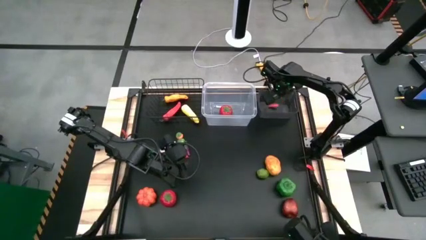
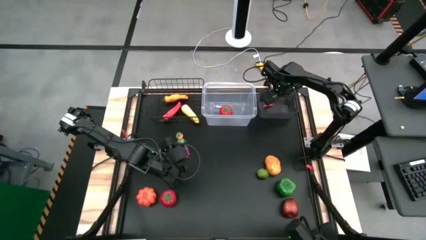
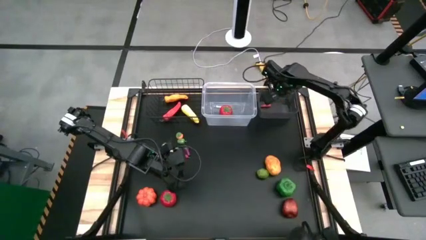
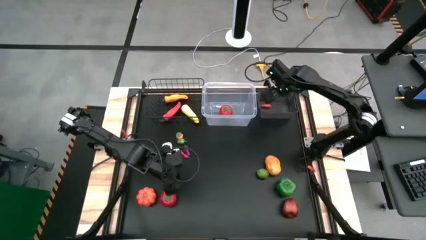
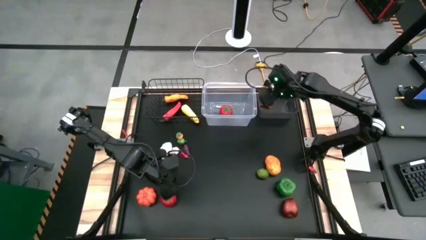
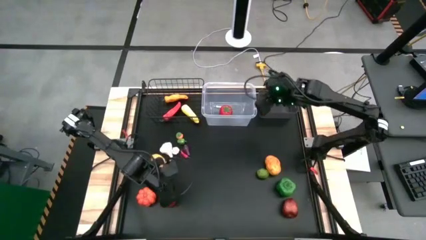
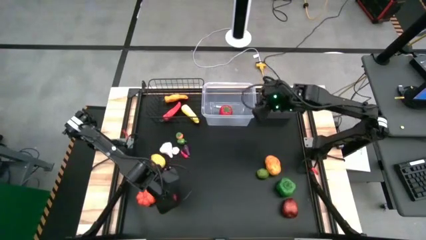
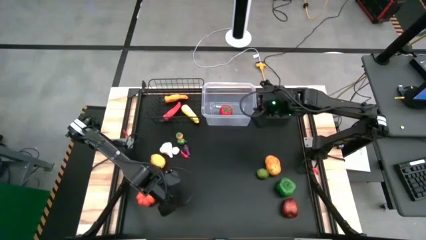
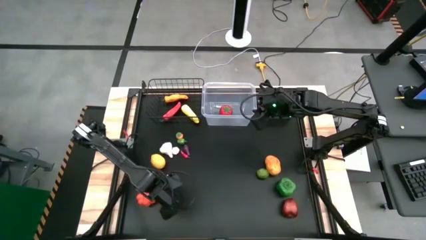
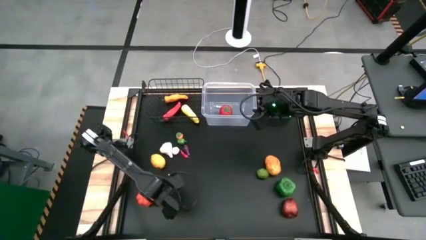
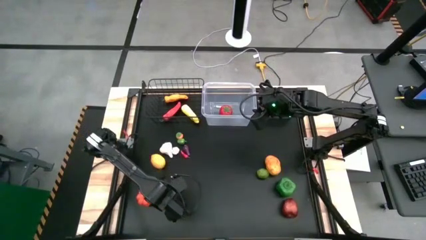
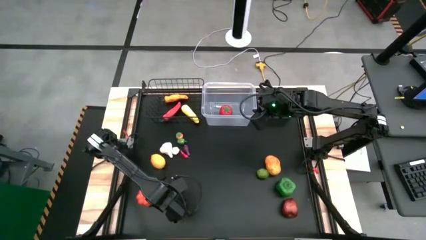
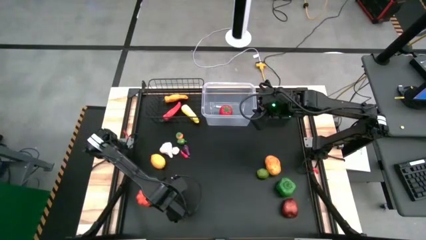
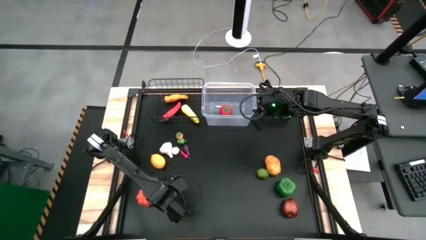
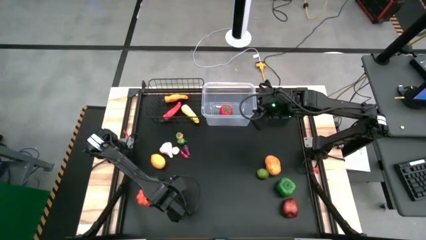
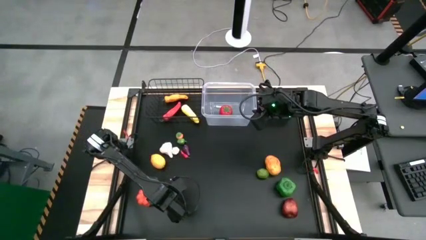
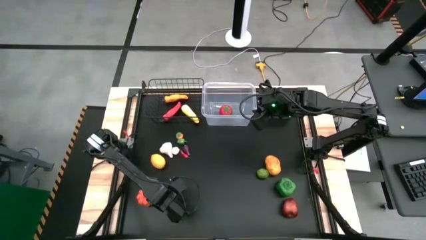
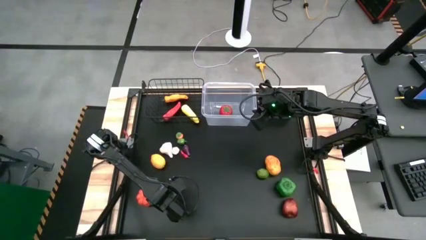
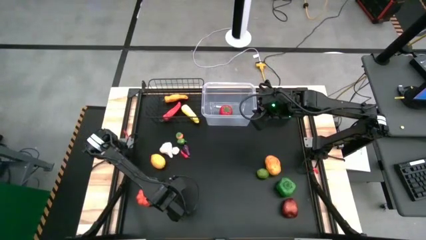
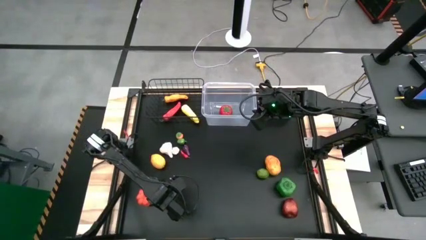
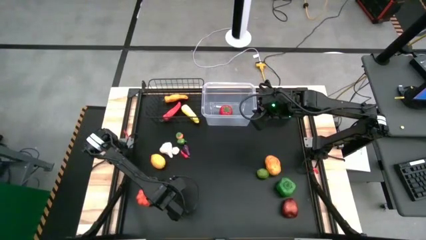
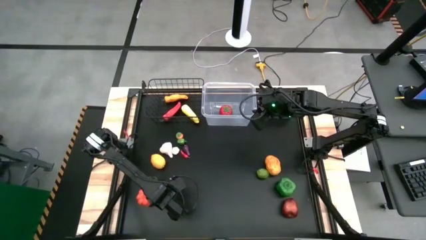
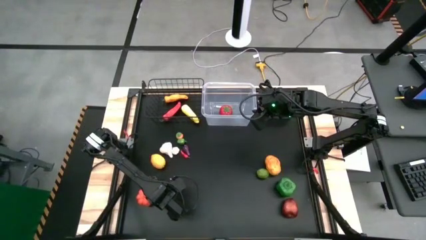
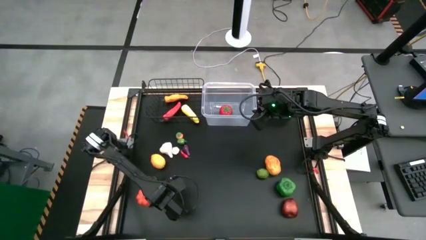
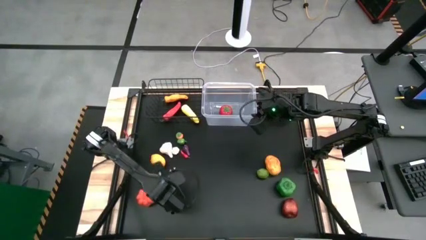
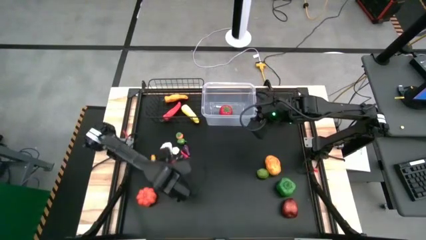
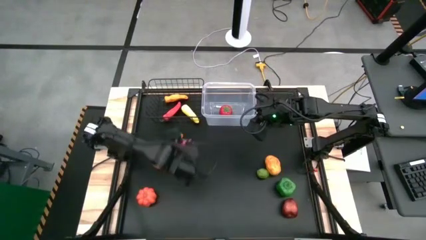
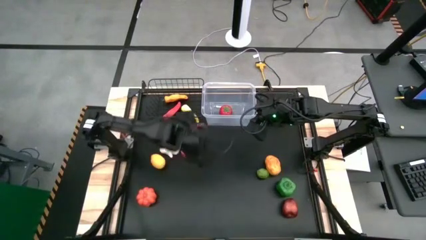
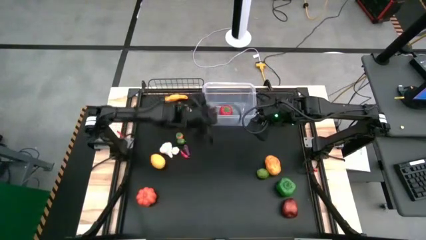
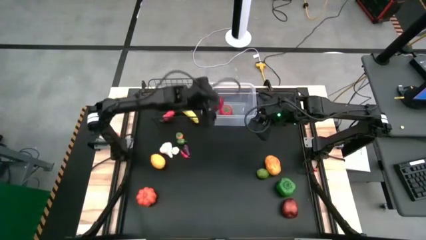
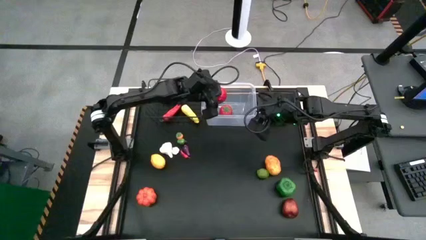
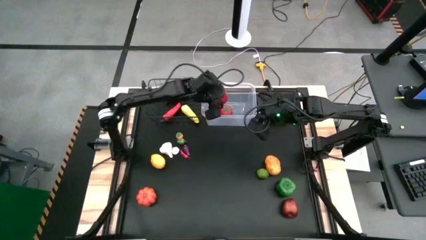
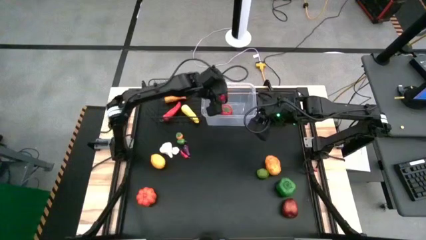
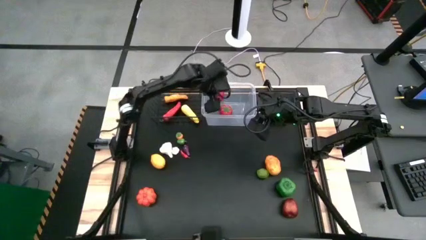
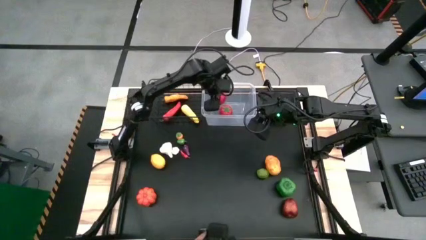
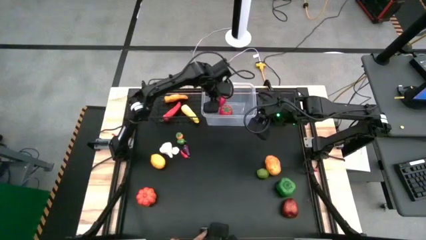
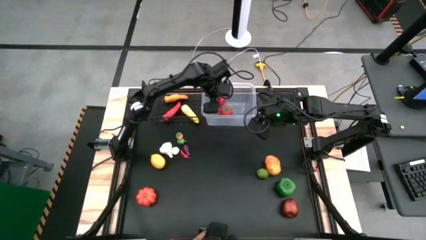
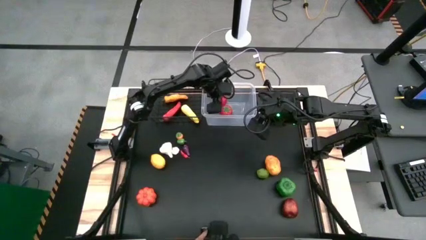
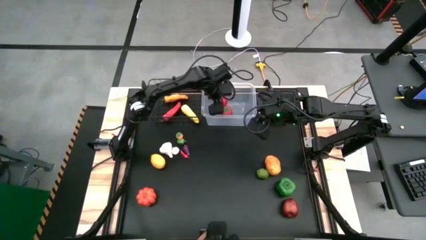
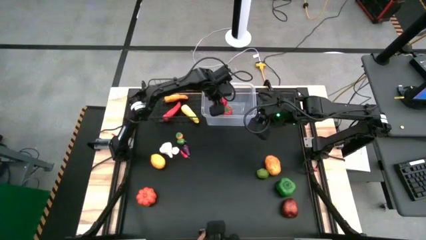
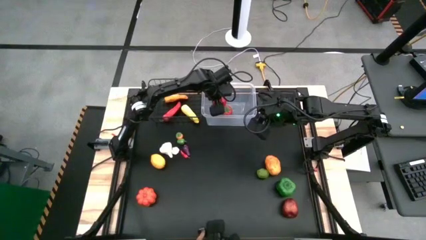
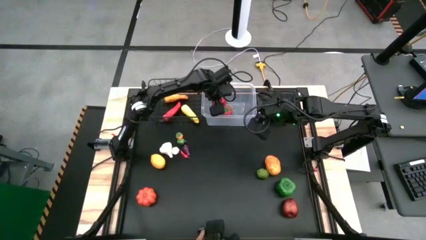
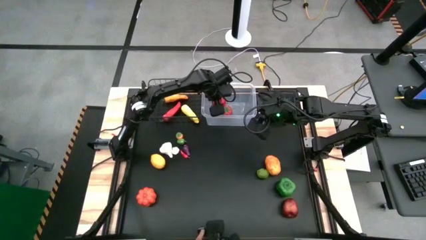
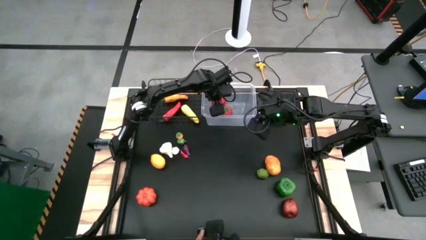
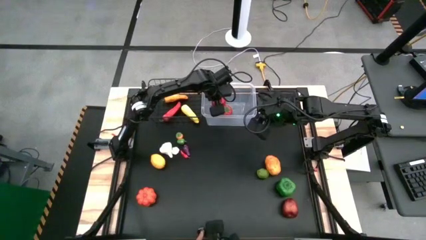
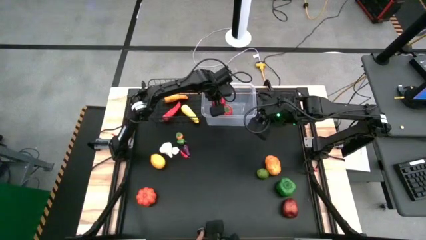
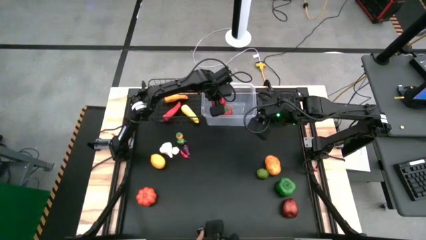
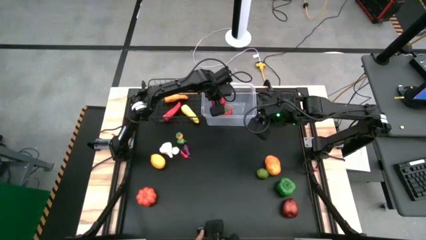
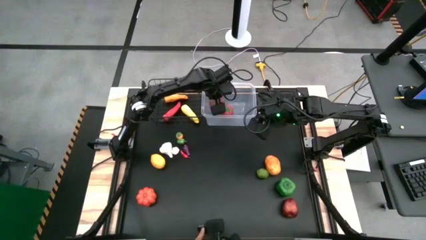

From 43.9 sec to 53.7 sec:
Task: Sort produce into baskets
Put the red tomato into the transparent bin

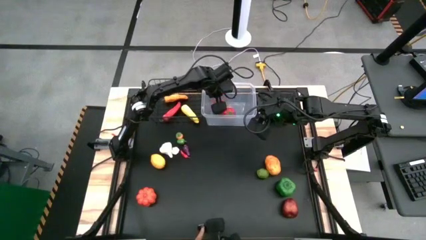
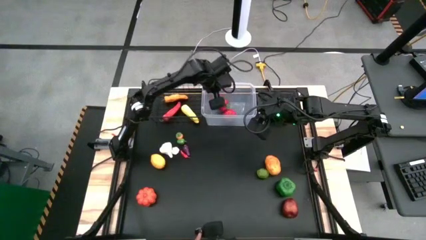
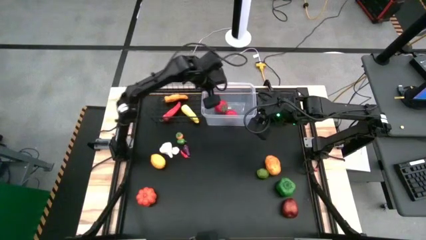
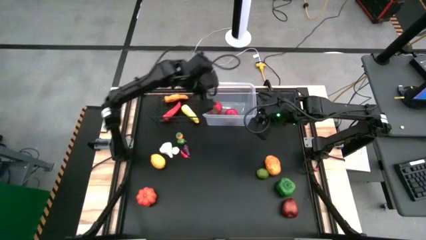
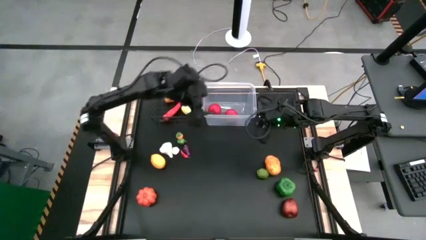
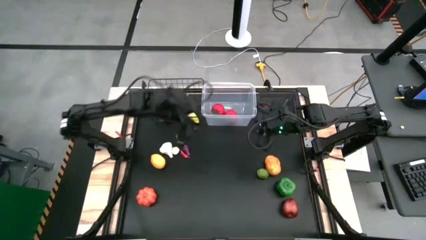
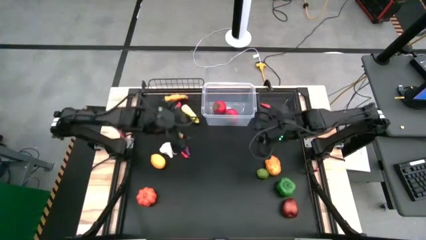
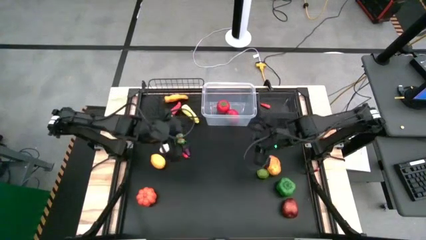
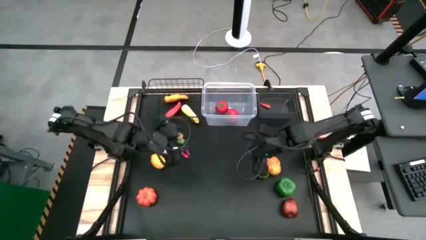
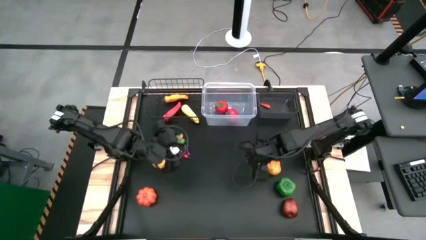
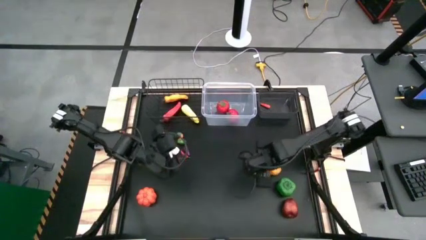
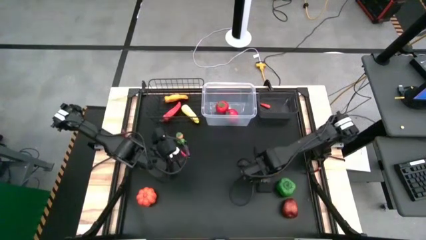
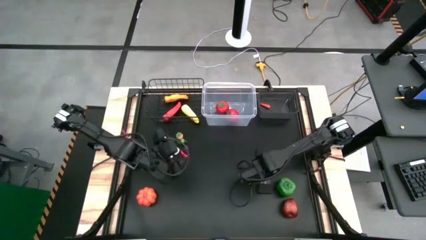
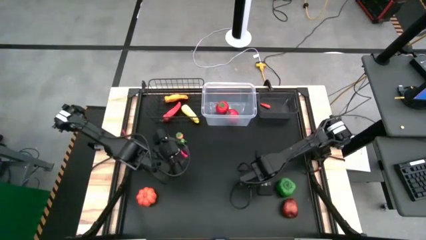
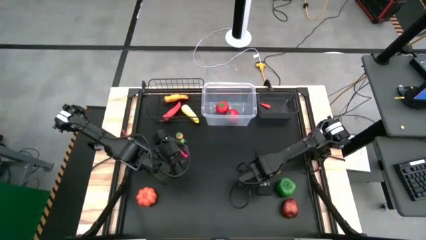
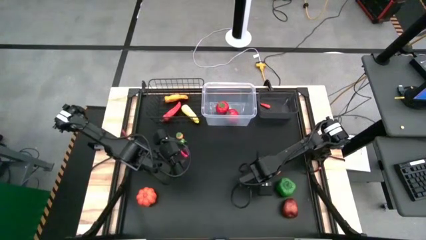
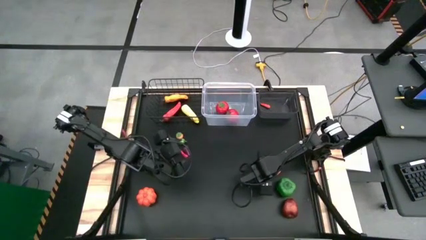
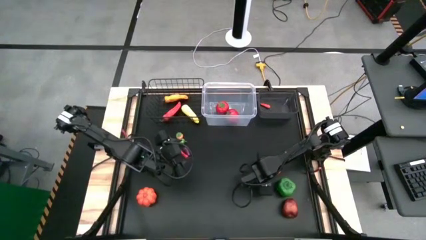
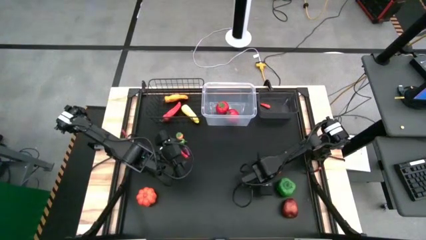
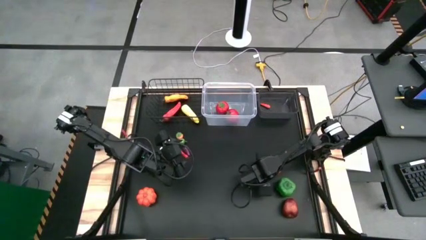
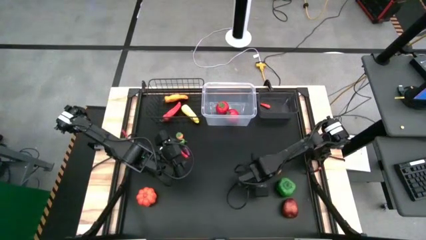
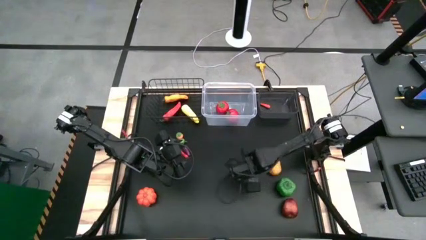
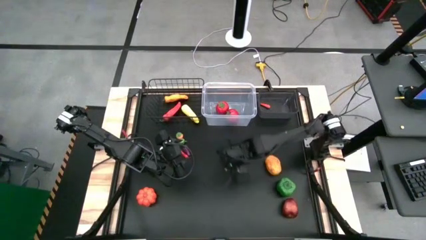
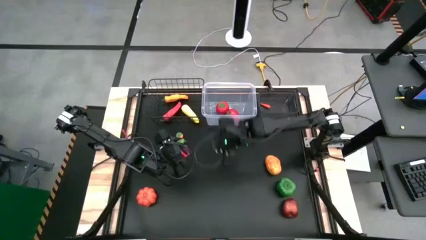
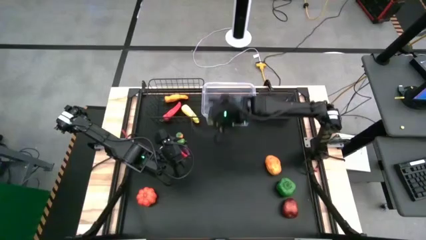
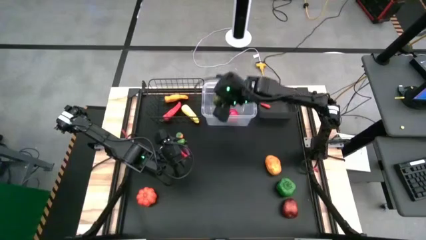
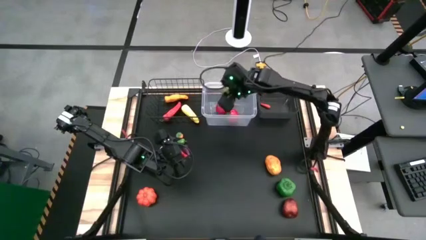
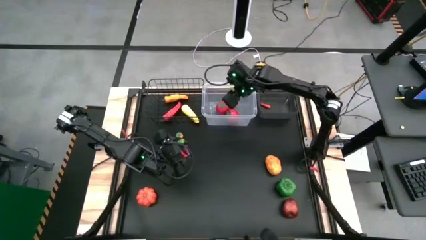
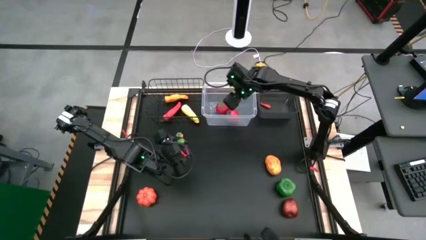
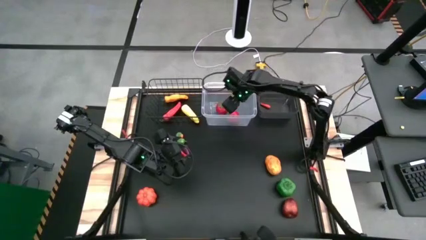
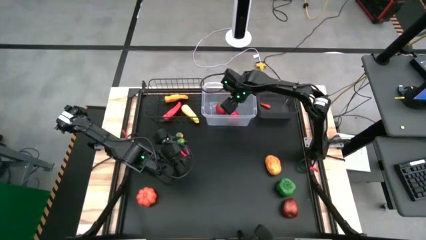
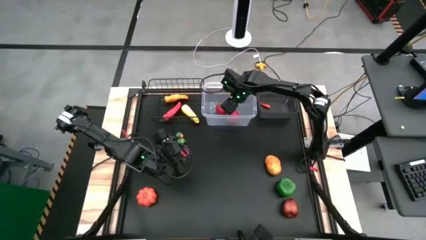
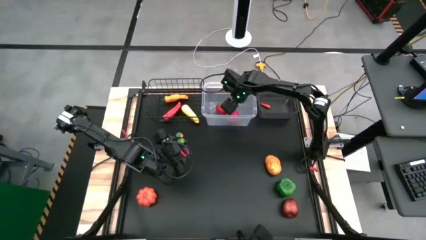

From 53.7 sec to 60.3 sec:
Put the lime into the transparent bin
